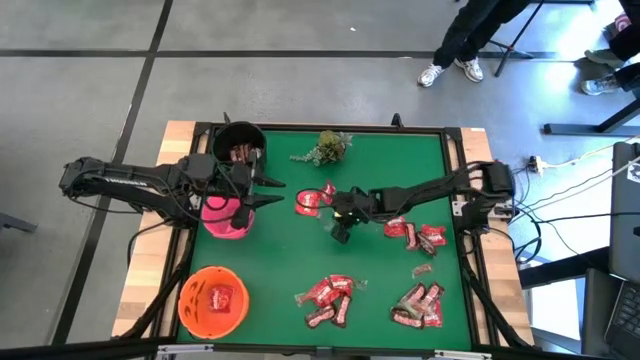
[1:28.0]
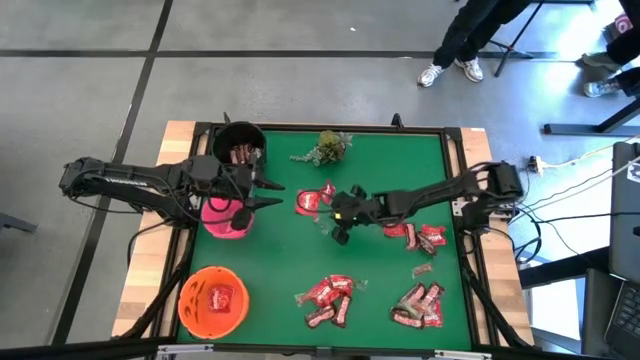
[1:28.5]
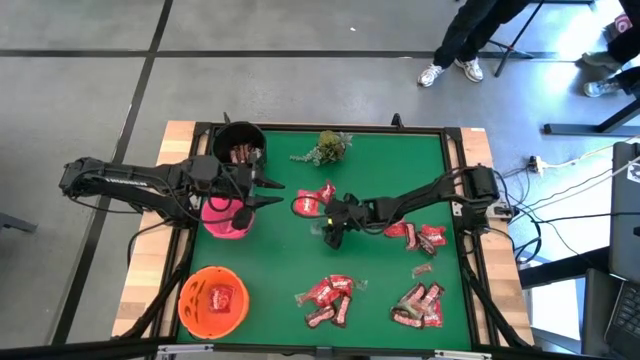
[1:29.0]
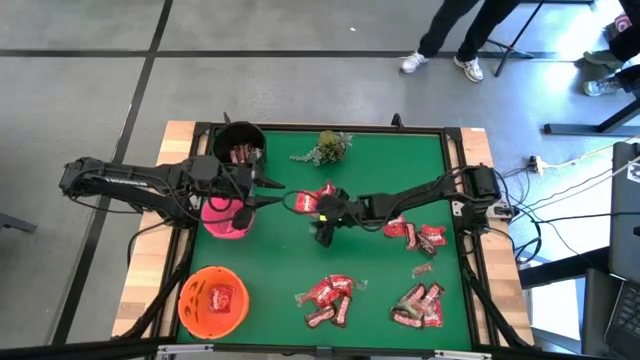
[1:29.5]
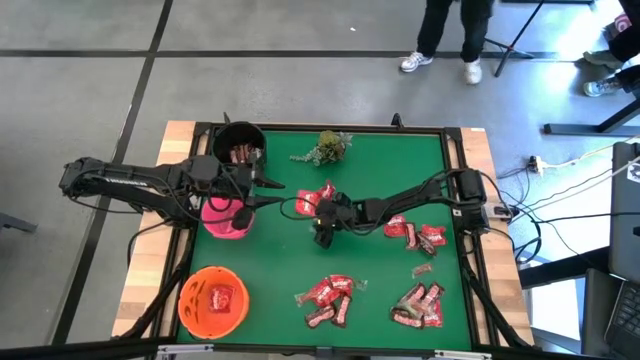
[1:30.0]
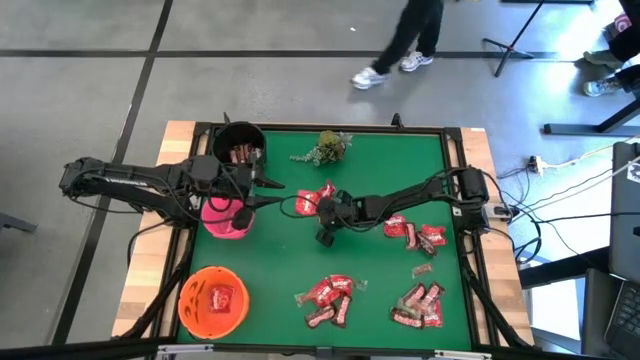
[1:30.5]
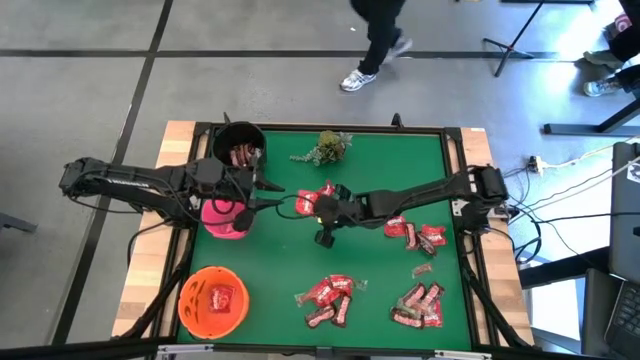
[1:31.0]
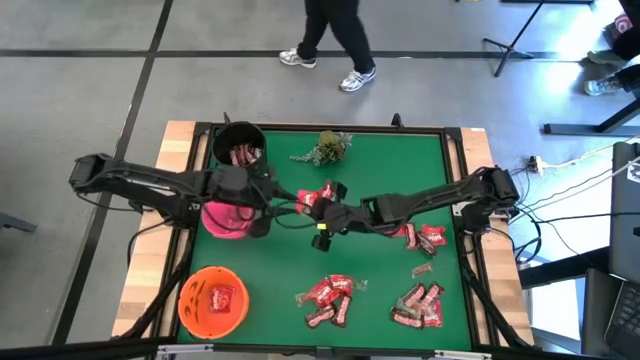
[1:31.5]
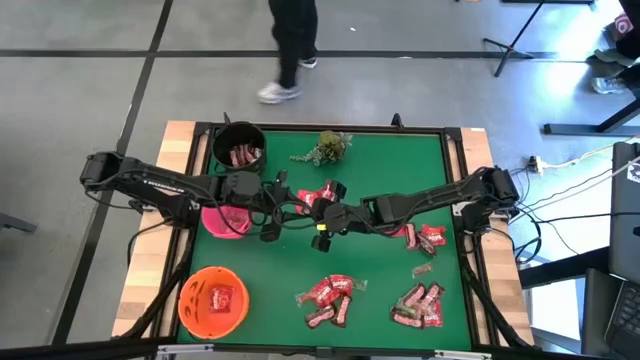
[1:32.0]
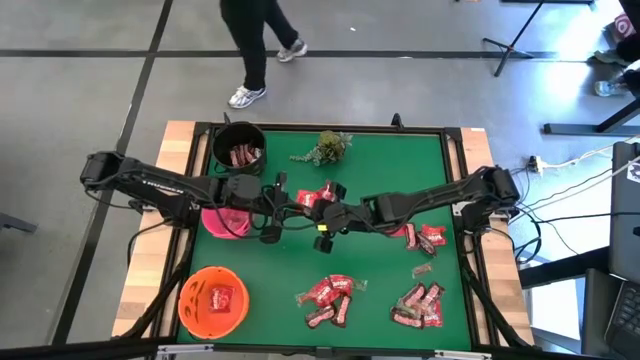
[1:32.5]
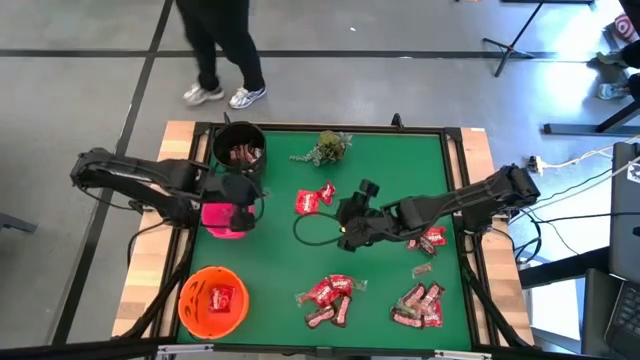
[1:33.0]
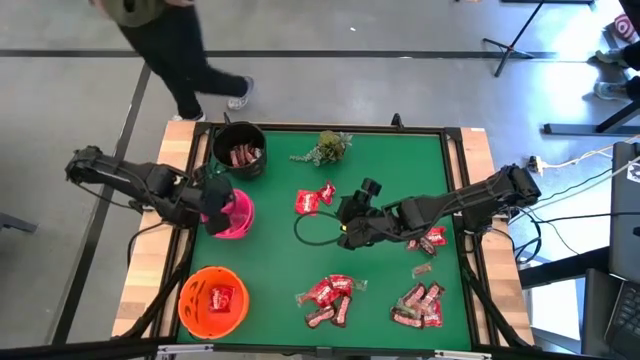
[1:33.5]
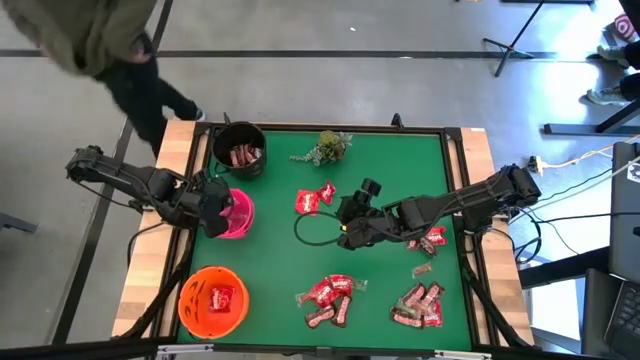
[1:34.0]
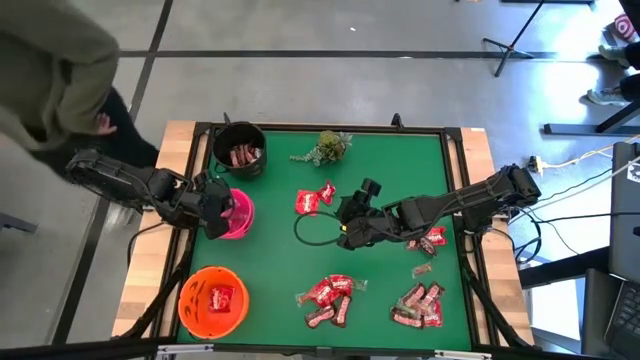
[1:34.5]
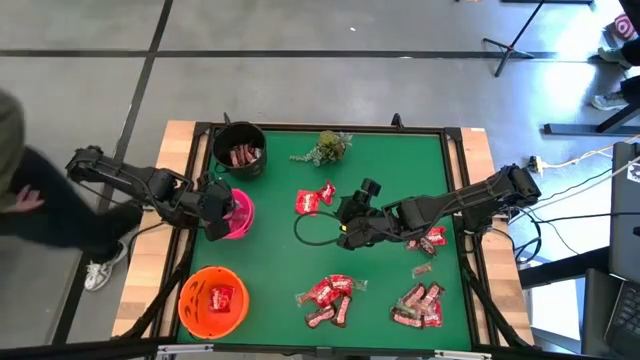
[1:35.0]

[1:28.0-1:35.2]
Task: Sort candy
Put the blue gummy into the pink bucket

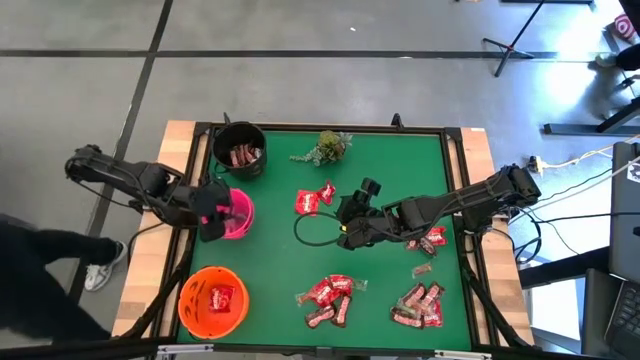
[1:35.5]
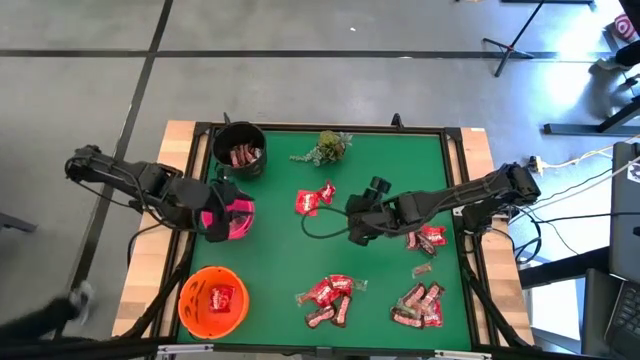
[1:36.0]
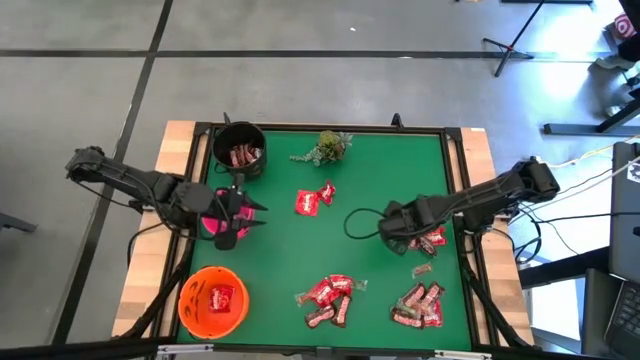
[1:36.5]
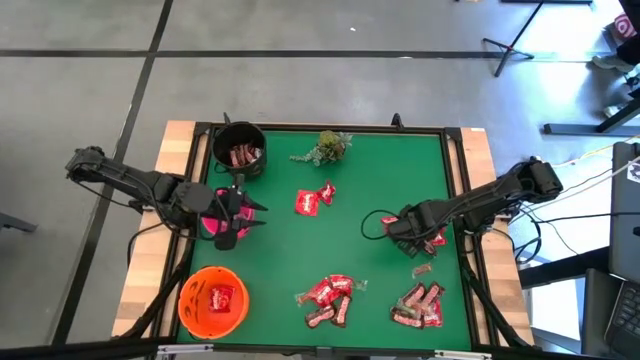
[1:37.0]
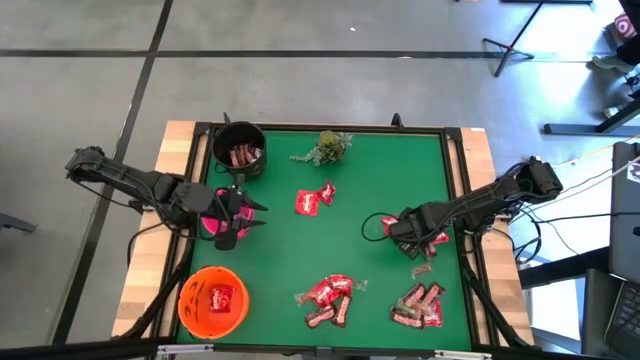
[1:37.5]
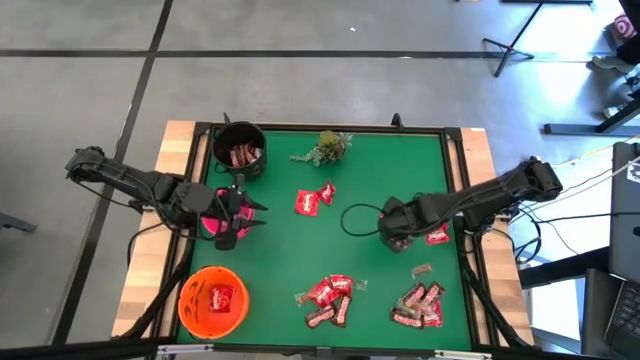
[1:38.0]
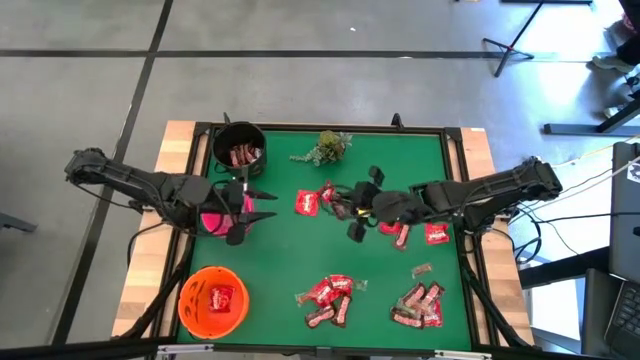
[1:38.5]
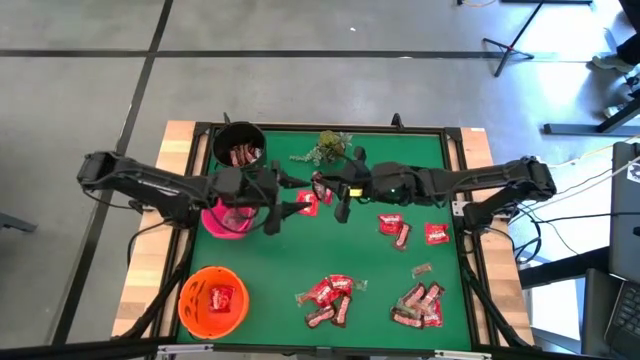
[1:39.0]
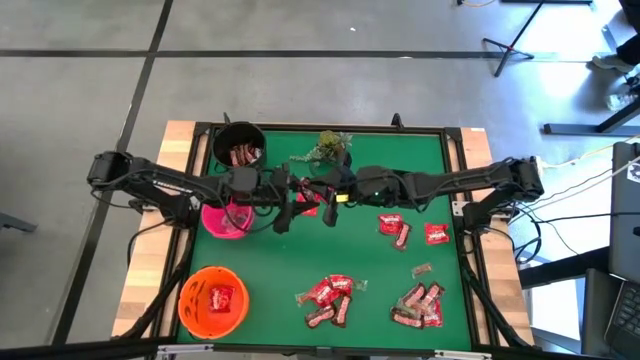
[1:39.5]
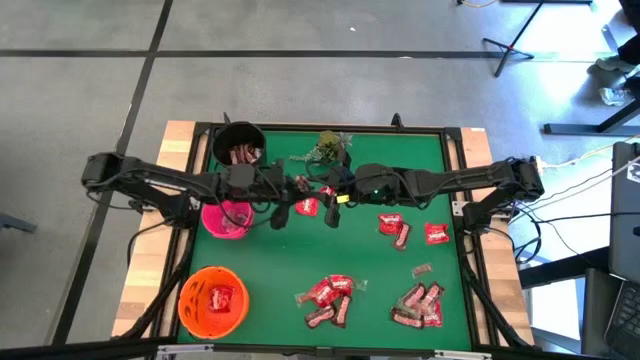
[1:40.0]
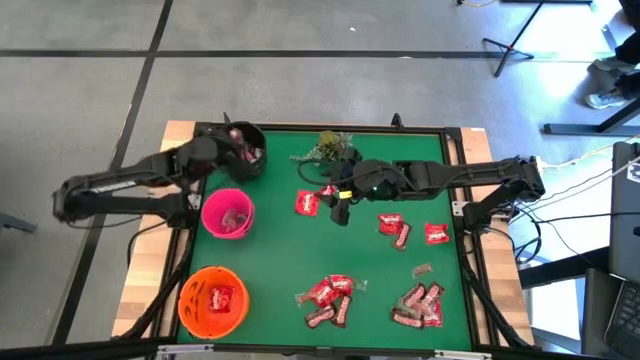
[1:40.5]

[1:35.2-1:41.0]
Put the brown chocolate into the black bucket

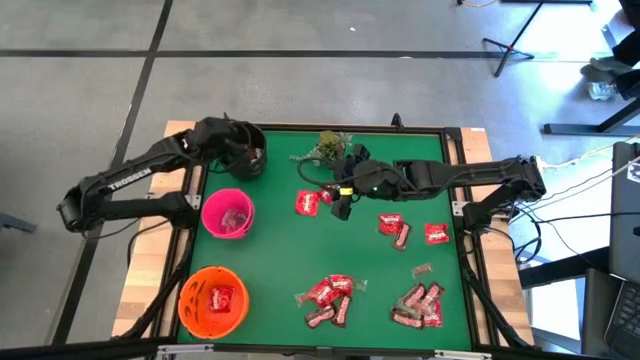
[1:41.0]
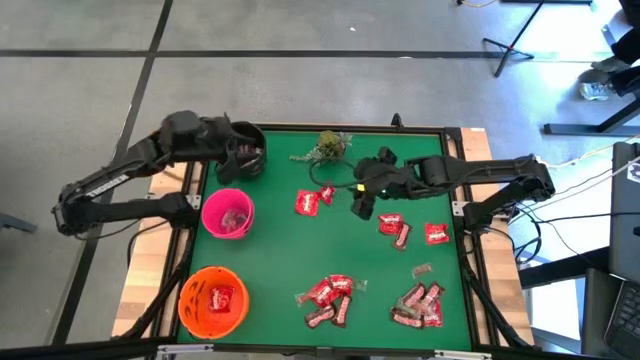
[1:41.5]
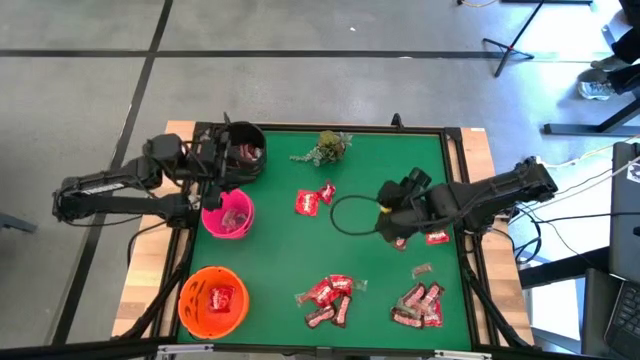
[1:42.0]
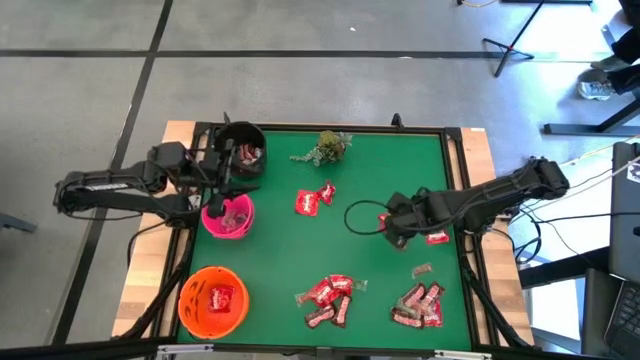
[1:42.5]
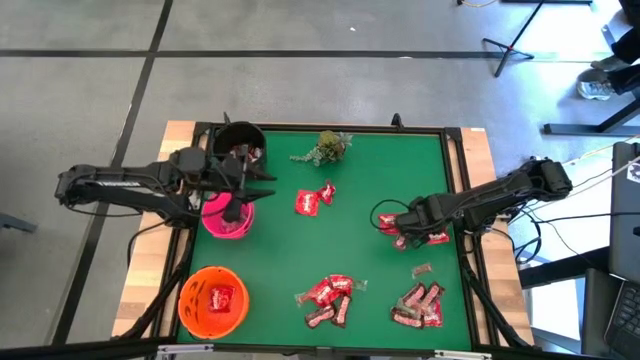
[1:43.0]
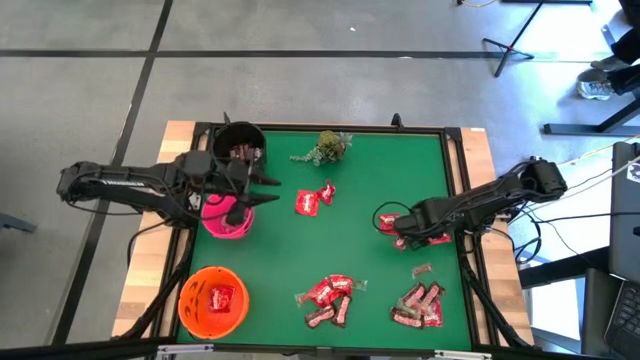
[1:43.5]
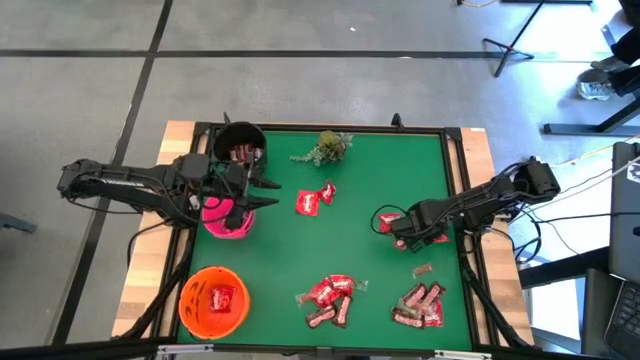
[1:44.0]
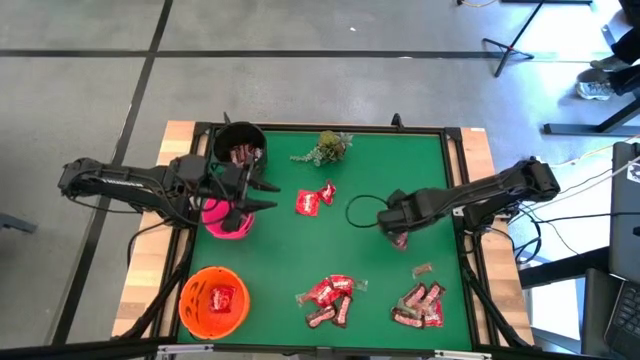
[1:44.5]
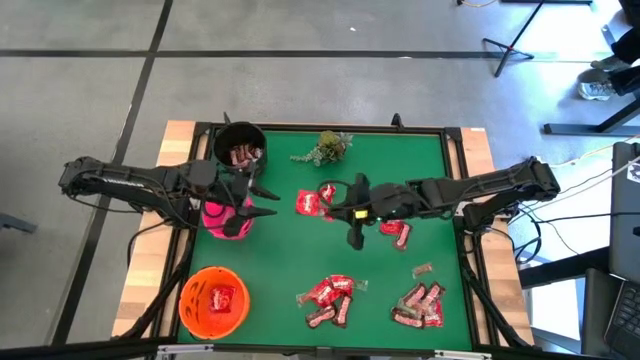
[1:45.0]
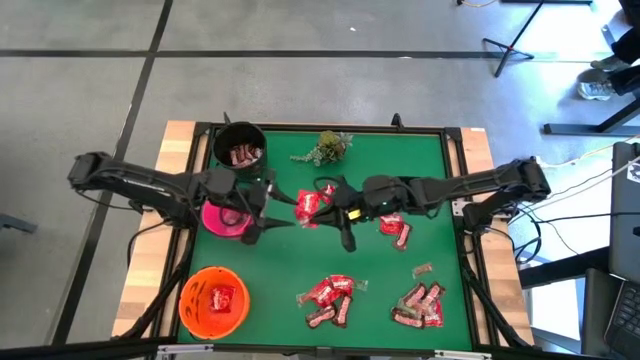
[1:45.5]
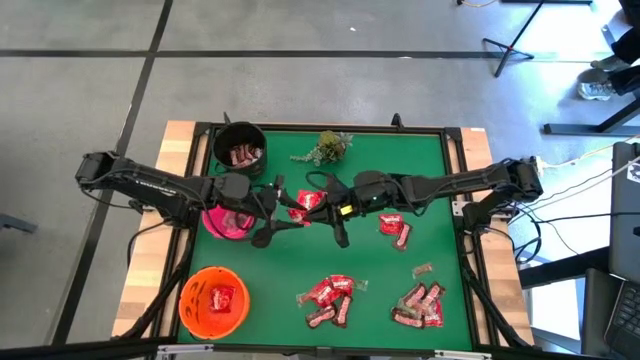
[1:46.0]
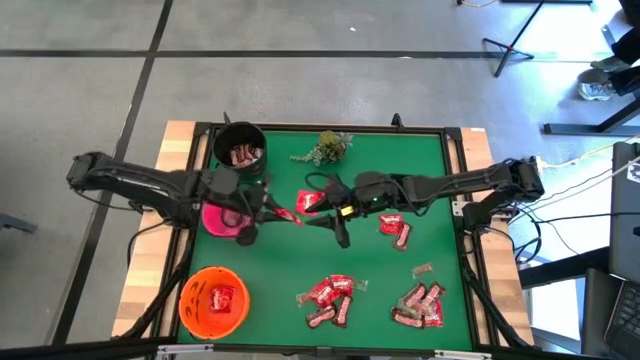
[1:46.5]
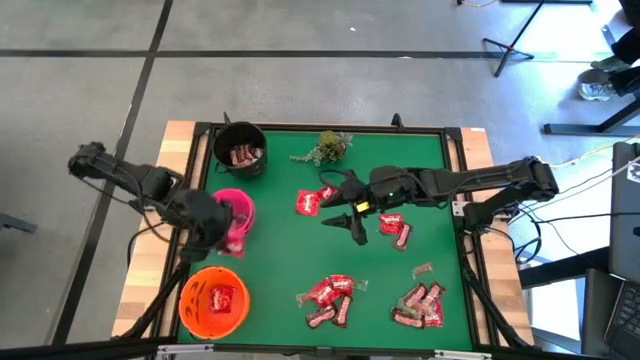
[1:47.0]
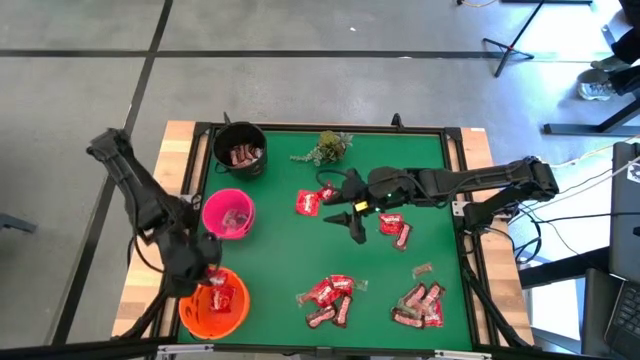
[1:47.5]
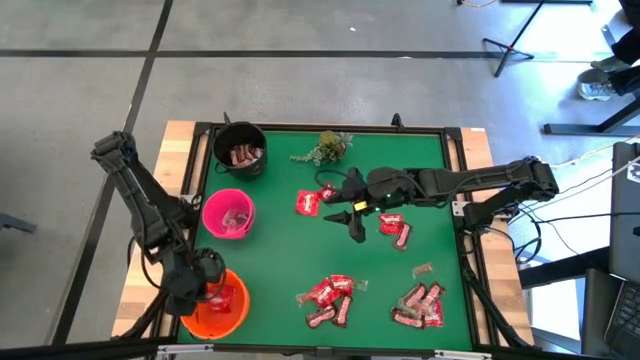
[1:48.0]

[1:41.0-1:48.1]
Put the red candy into the orange bucket
